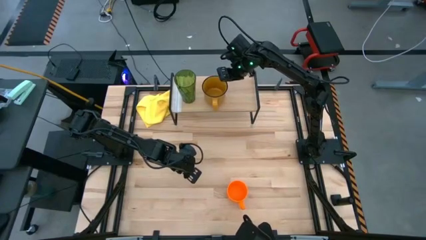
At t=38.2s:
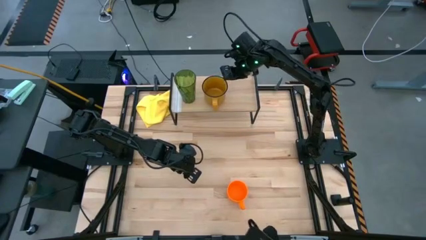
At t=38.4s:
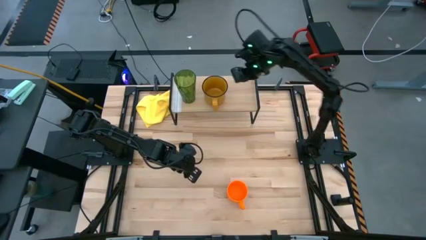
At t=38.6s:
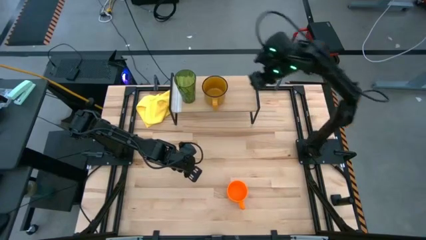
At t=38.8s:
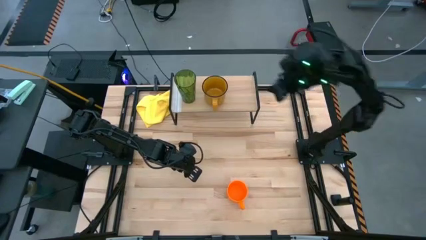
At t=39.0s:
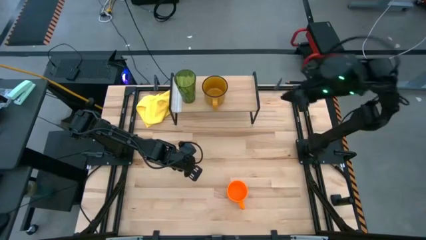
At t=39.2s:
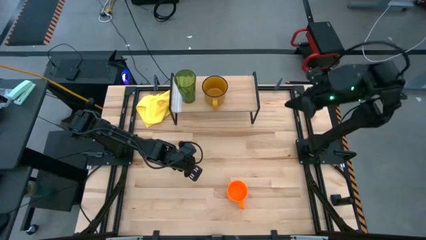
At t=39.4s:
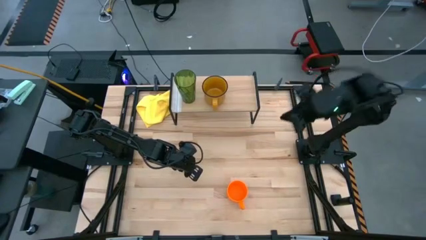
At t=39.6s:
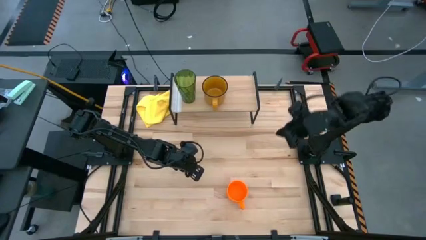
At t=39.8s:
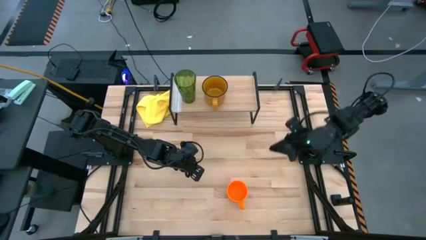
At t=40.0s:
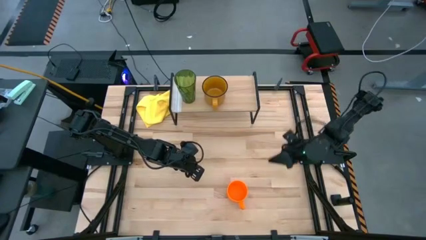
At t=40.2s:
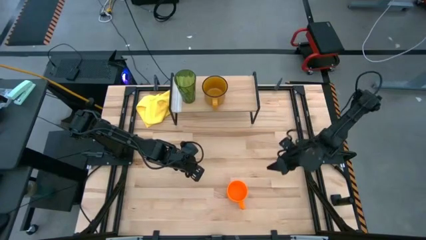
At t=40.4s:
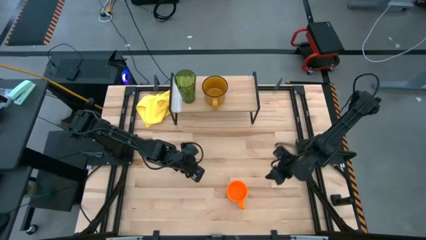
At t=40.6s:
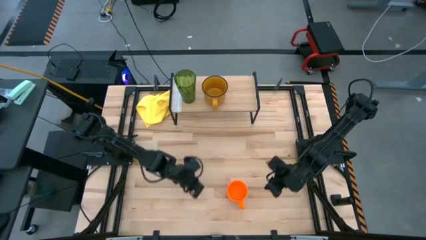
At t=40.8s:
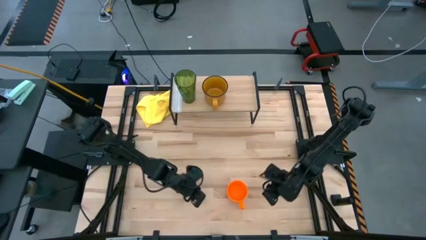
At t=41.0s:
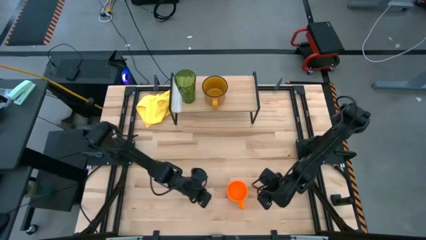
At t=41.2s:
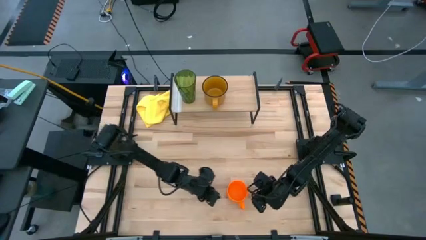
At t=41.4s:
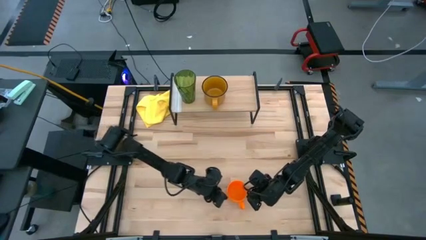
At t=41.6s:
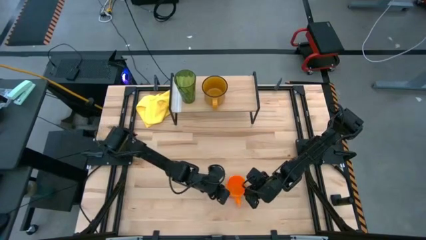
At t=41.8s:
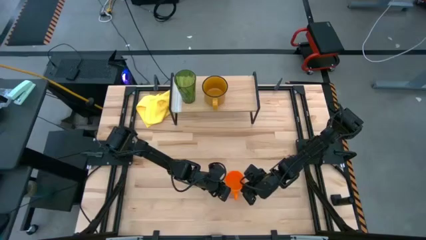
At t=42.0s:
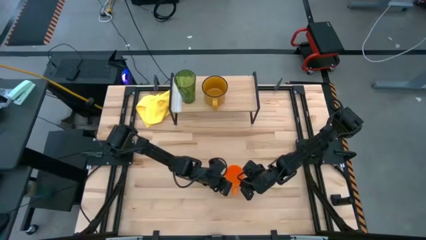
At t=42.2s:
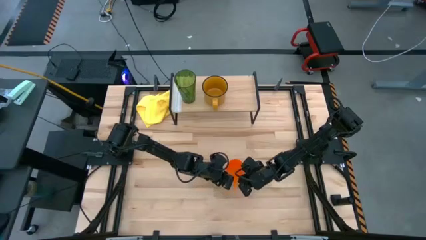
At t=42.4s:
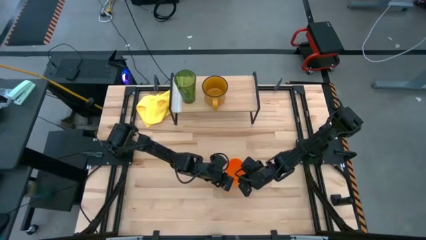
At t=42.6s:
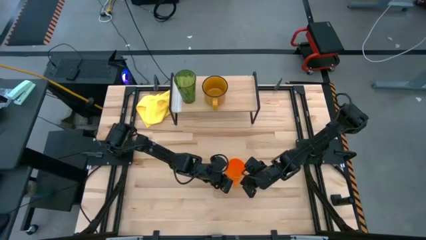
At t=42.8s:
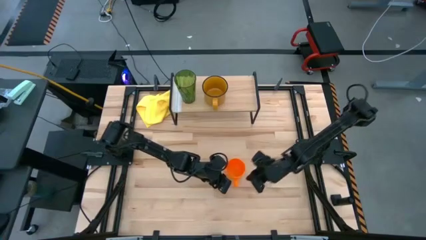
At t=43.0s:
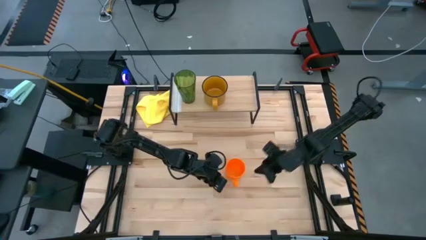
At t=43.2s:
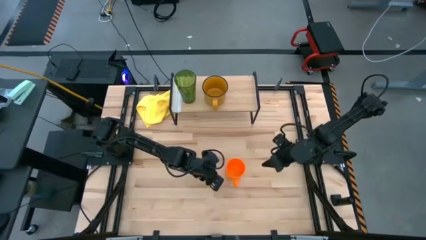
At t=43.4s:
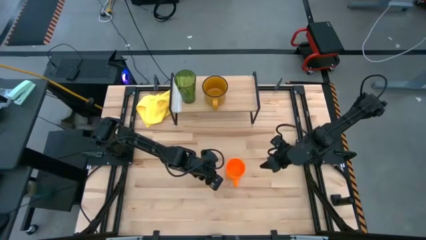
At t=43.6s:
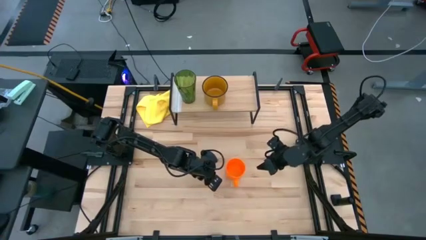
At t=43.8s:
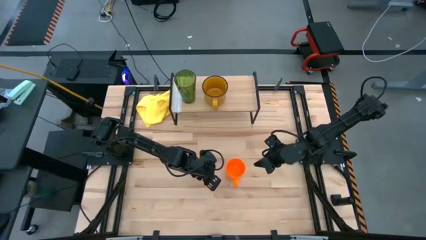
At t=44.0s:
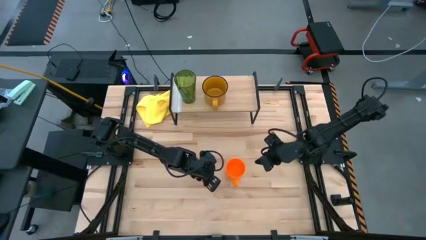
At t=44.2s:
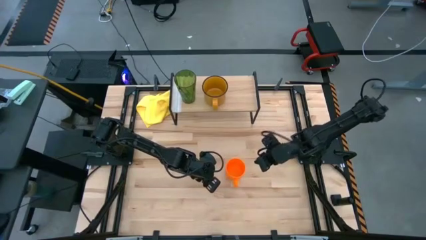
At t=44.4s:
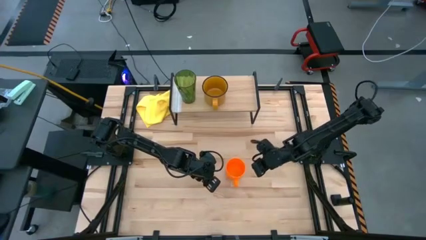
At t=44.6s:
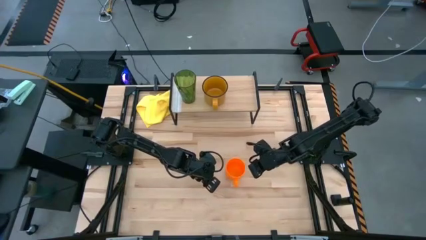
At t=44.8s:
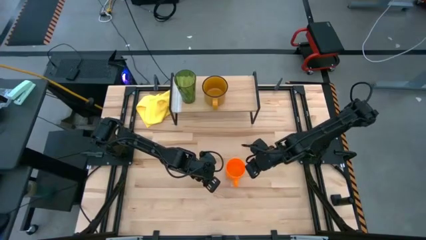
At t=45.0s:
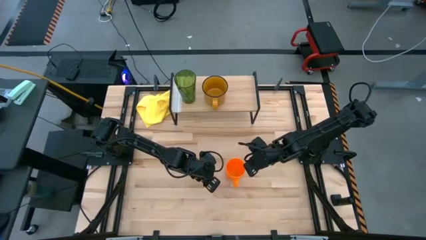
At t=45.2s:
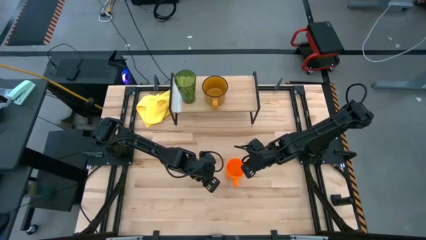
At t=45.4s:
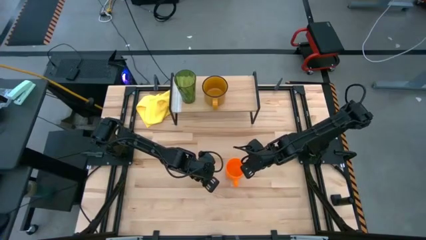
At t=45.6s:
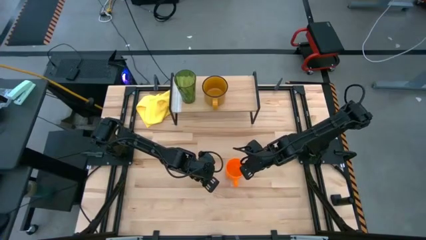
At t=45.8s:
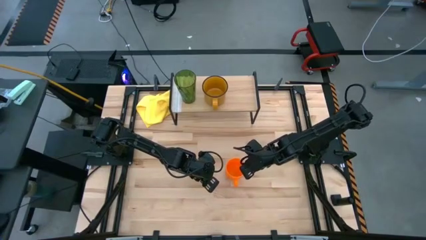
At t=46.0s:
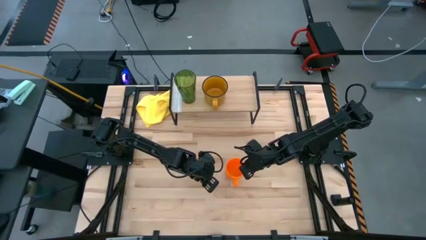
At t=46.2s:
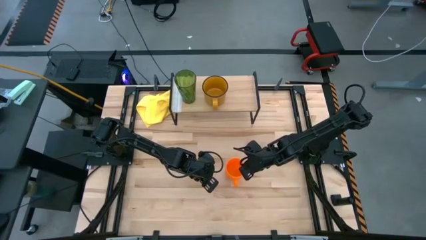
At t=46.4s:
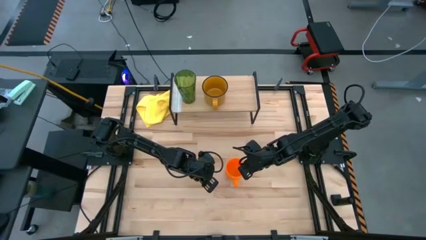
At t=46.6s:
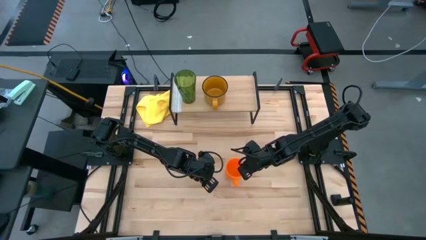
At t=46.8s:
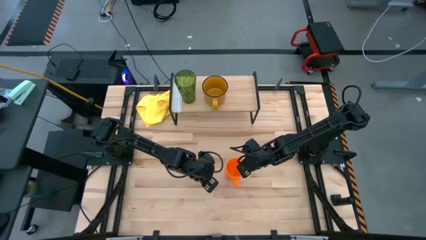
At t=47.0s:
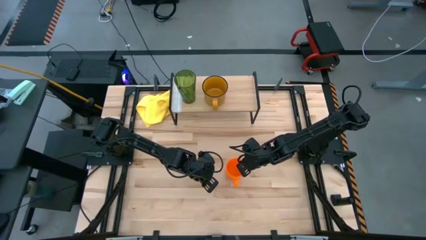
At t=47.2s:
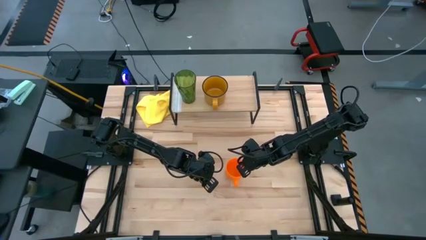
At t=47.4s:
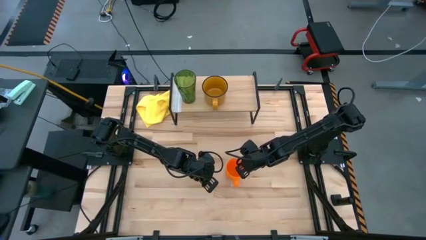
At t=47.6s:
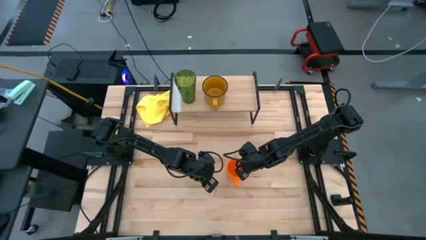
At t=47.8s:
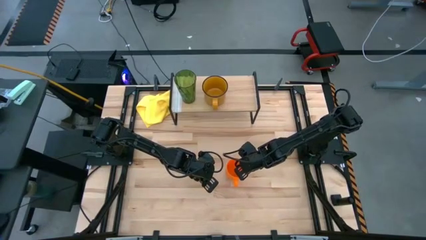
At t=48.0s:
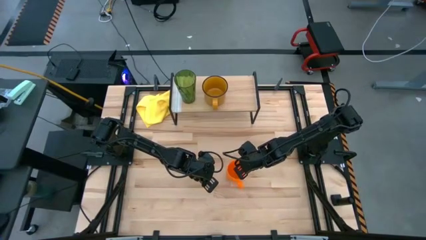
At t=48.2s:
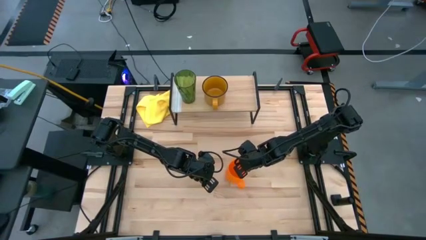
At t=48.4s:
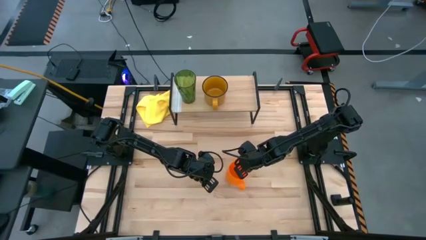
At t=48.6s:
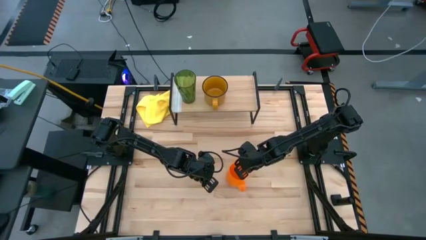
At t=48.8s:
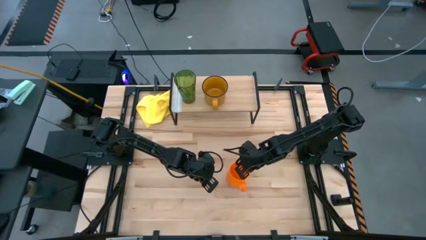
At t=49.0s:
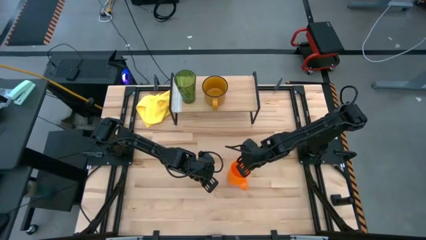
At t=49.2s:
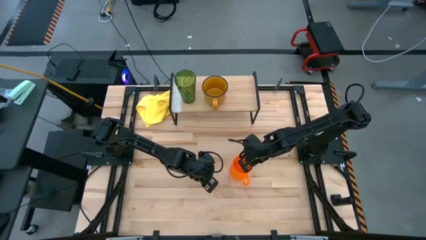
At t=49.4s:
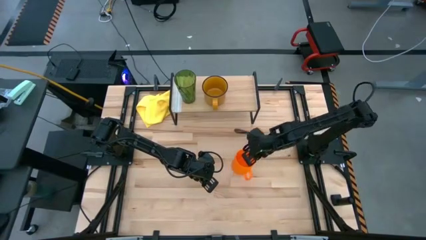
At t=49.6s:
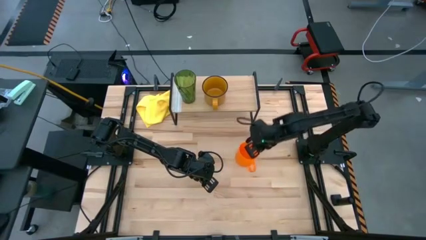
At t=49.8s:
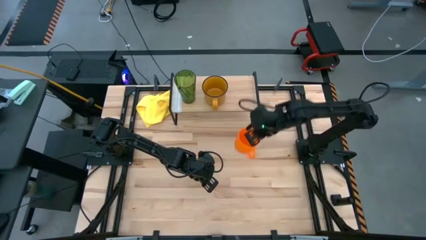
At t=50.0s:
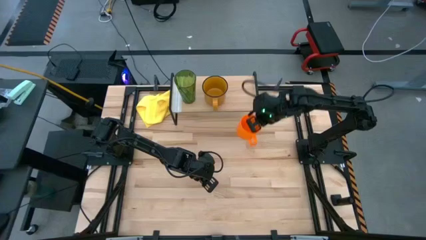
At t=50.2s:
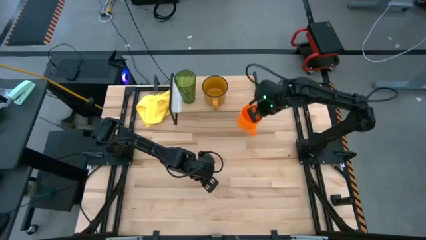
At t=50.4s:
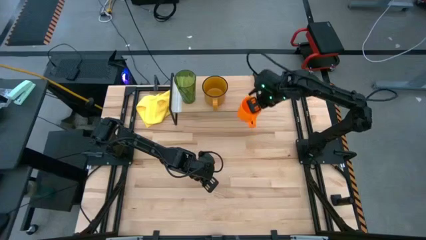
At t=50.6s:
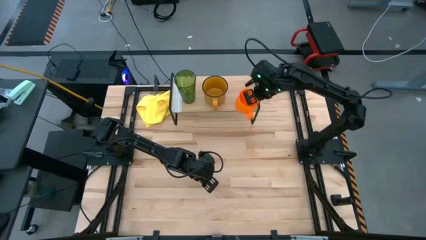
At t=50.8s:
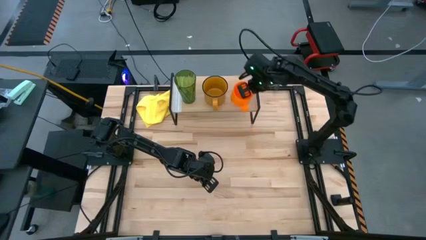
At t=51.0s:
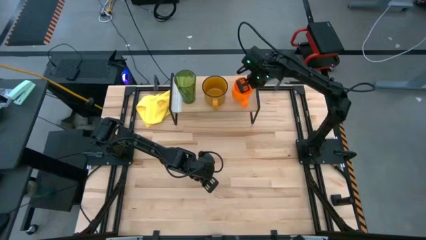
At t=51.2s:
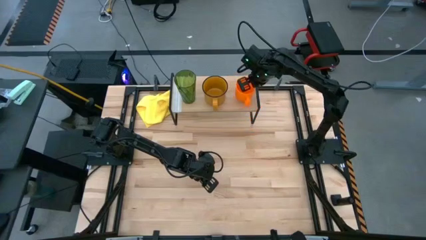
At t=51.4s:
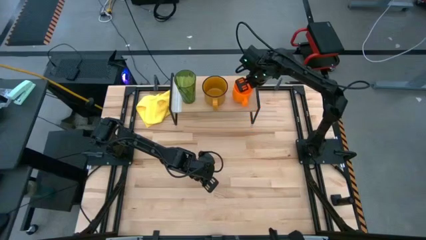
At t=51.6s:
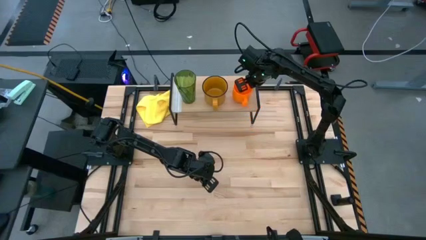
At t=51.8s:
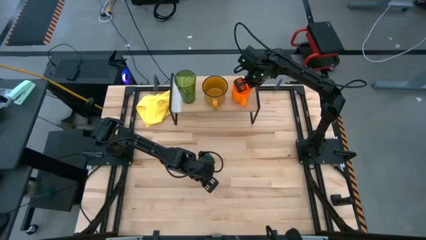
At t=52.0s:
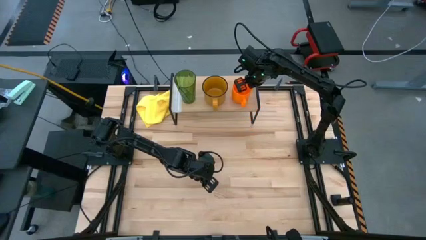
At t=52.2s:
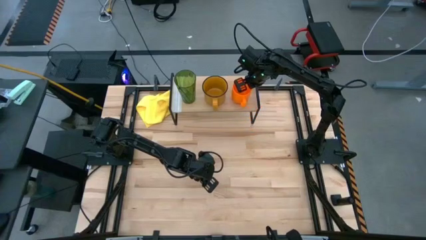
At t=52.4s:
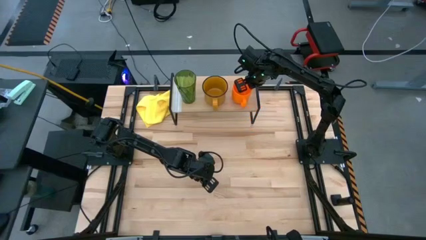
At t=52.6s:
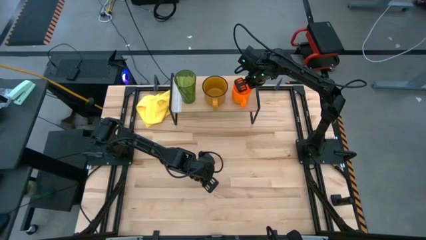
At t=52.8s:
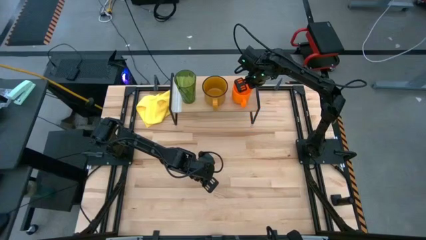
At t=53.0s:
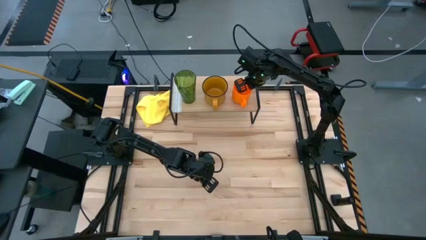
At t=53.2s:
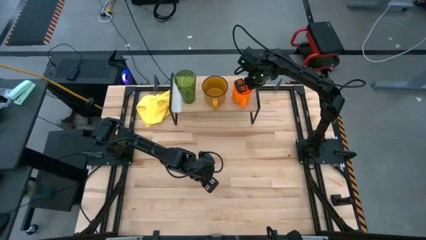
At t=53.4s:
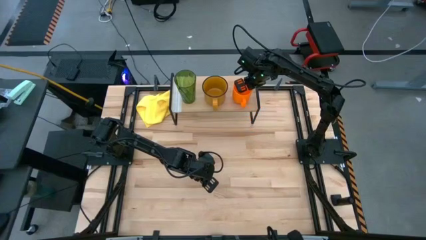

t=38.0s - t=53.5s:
Task: Stack small to large cups/mugs on shelf
Put the orange mug on the shelf
